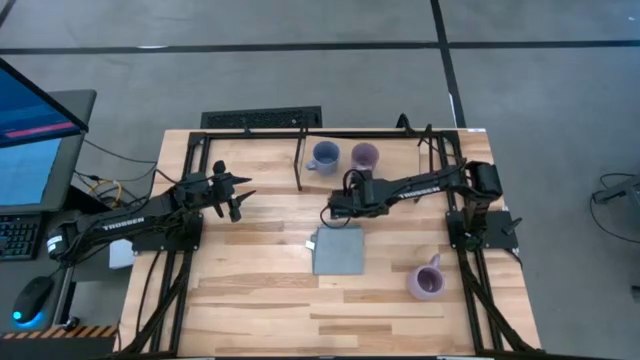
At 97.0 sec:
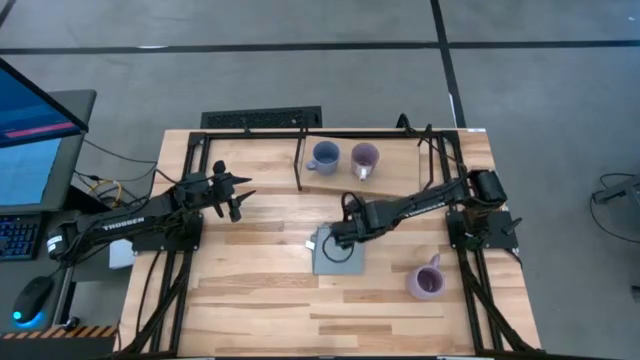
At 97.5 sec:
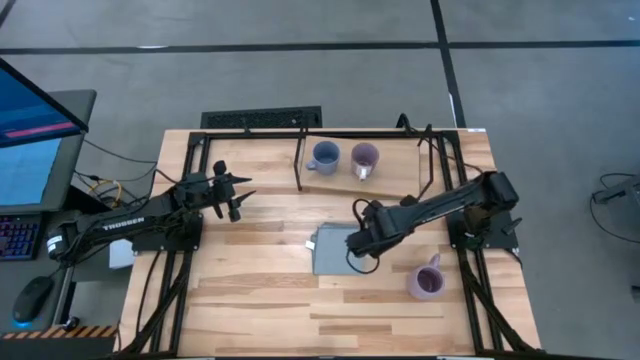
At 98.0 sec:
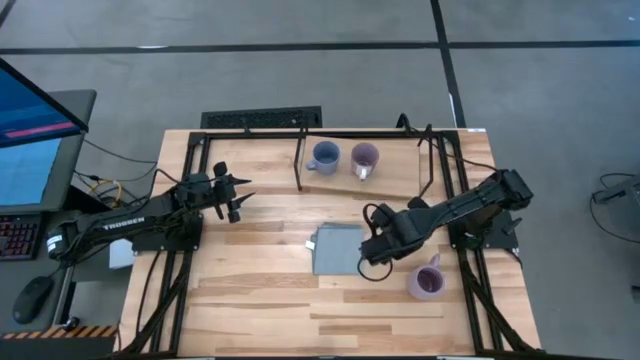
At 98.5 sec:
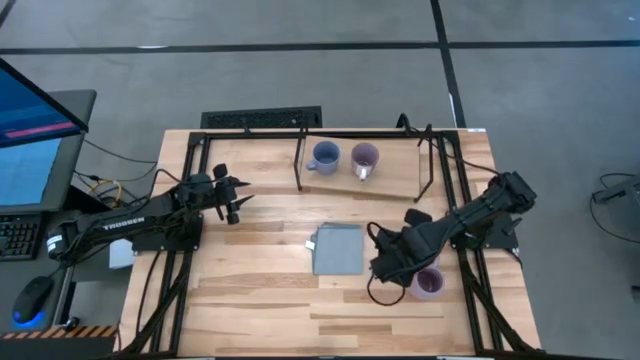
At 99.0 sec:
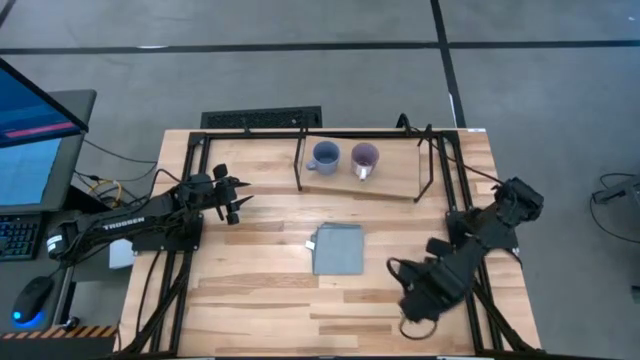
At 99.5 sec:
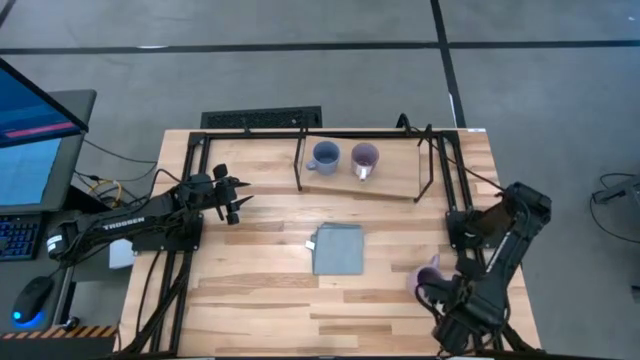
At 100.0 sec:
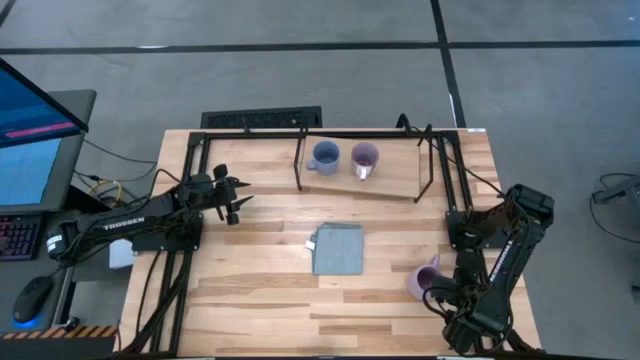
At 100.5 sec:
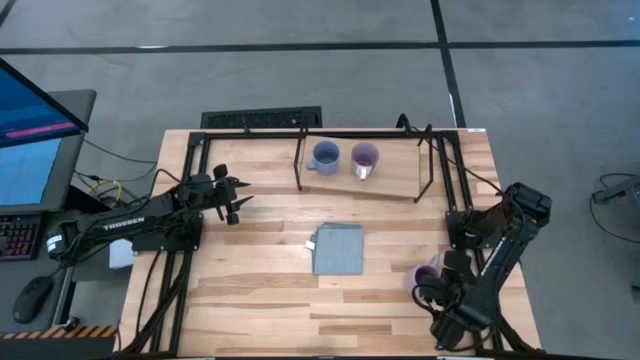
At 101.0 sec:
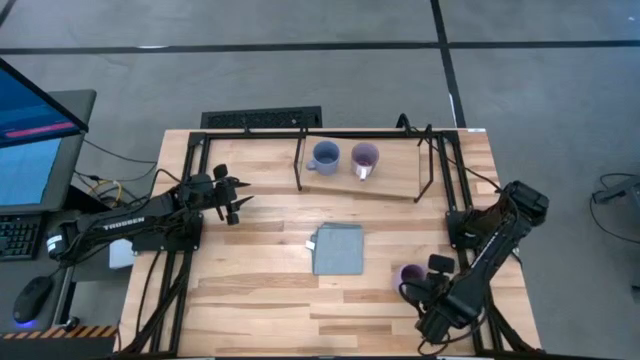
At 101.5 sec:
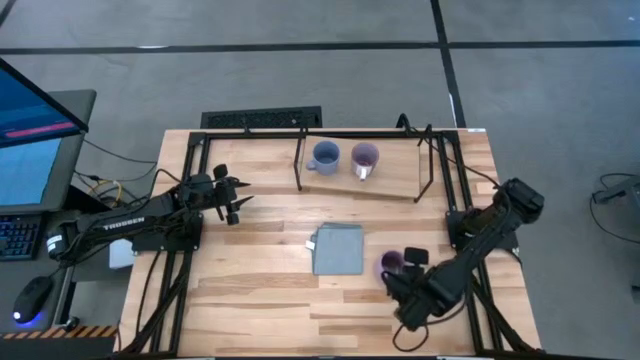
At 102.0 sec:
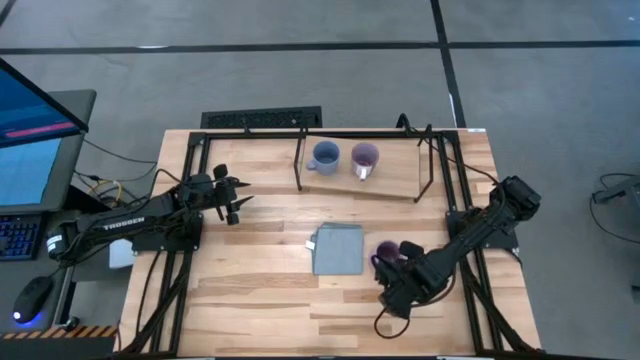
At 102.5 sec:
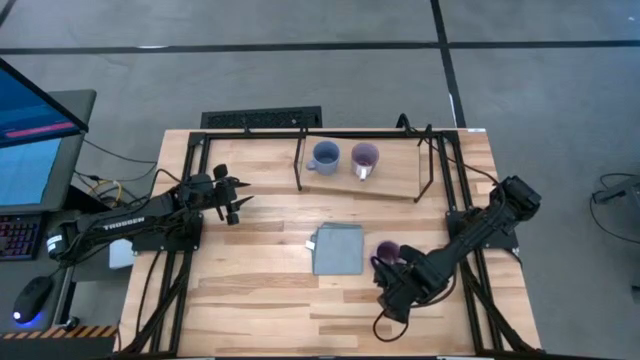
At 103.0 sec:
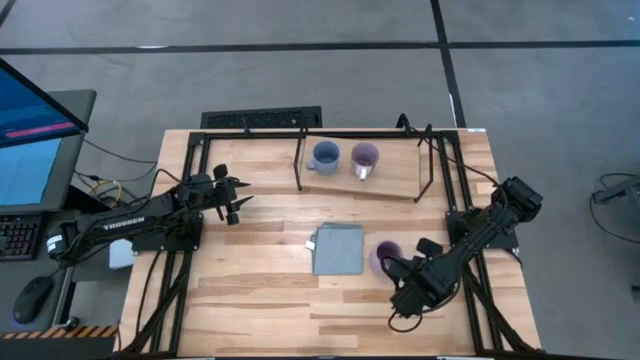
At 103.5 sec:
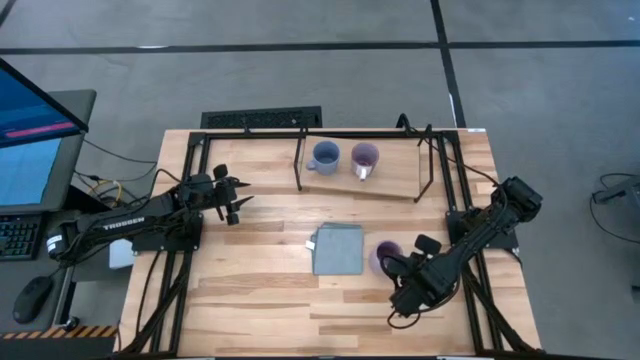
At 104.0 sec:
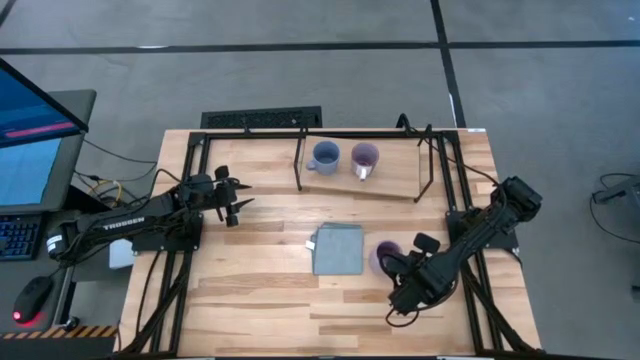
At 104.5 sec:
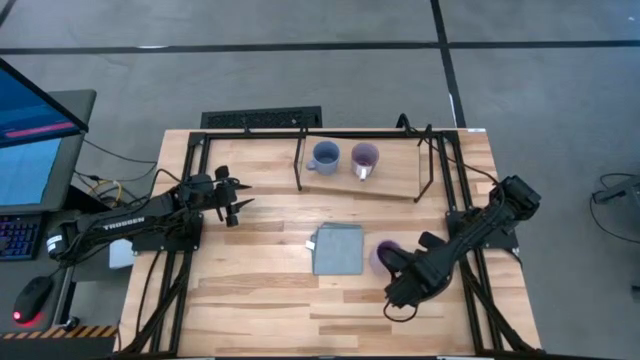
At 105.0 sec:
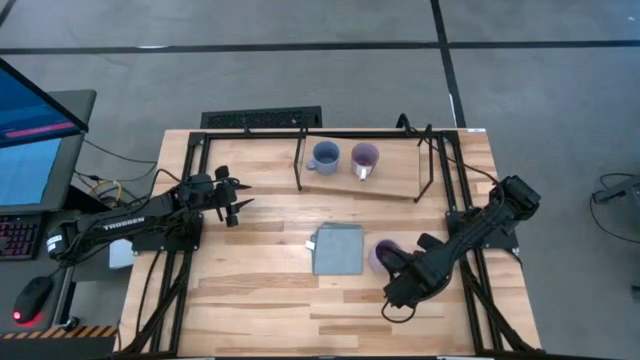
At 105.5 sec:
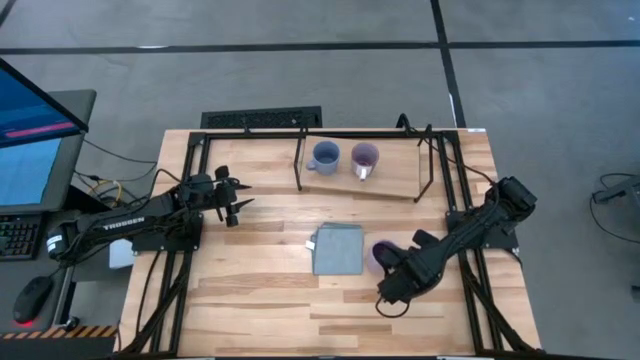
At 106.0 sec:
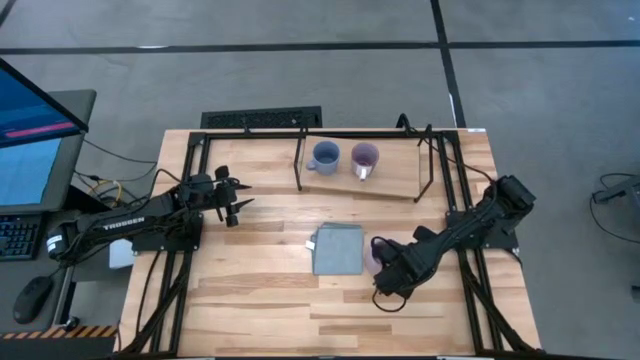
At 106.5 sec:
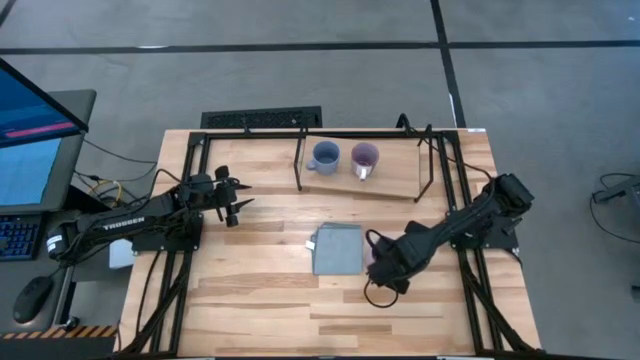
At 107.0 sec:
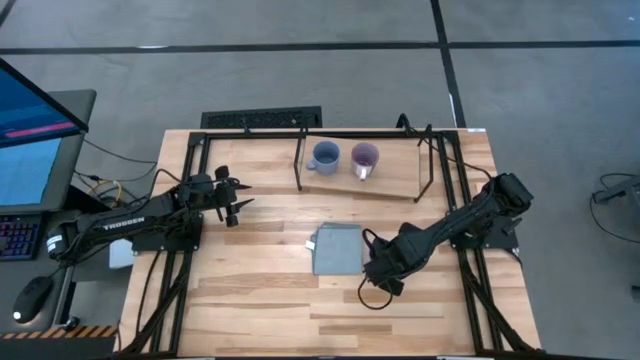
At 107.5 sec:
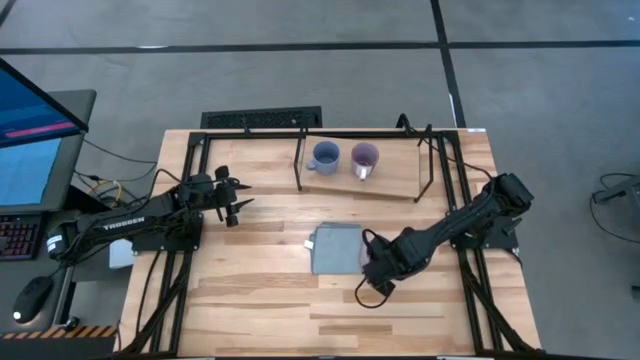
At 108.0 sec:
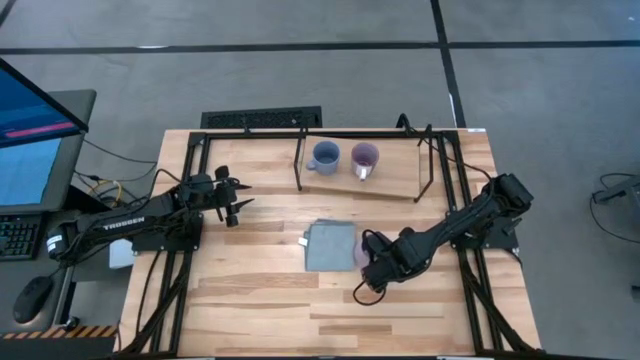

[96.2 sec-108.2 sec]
Task: Stack small to large cups/mugs on shelf
Put the violet cup on the shelf

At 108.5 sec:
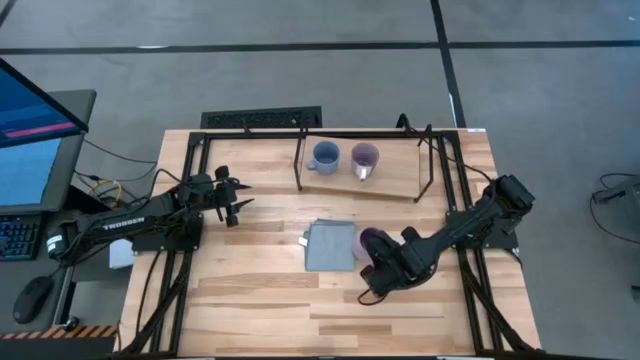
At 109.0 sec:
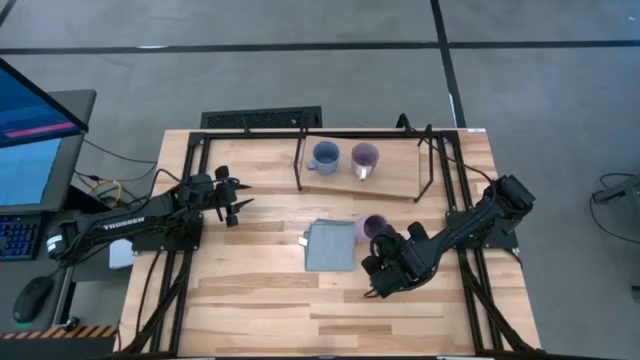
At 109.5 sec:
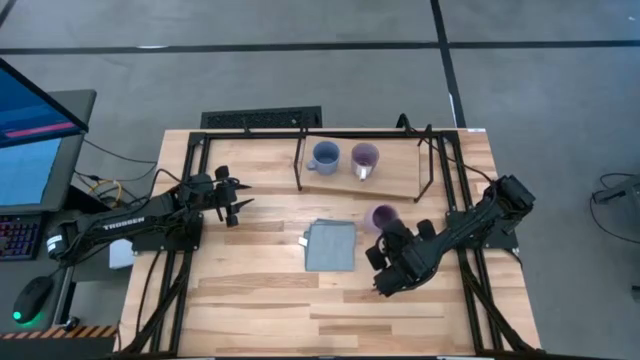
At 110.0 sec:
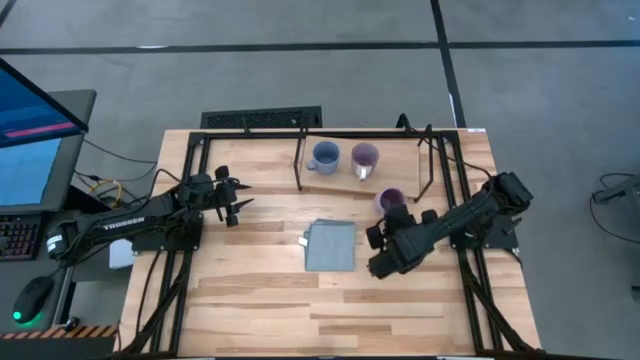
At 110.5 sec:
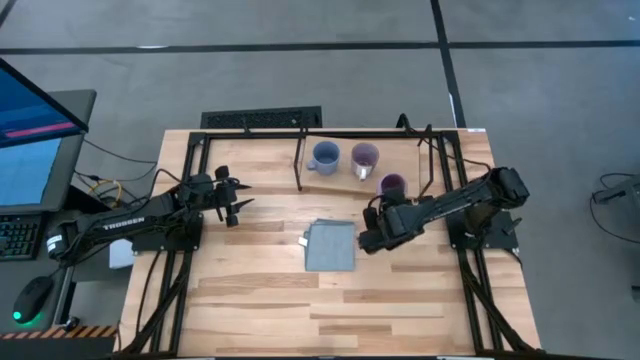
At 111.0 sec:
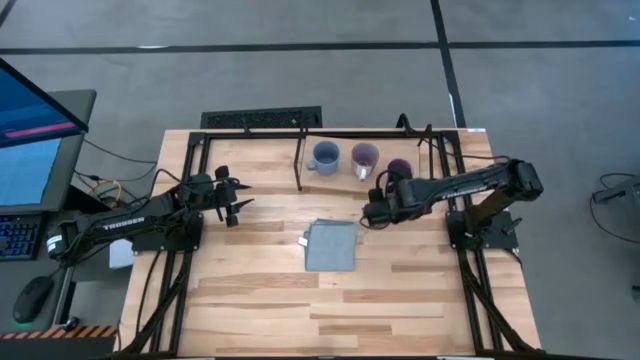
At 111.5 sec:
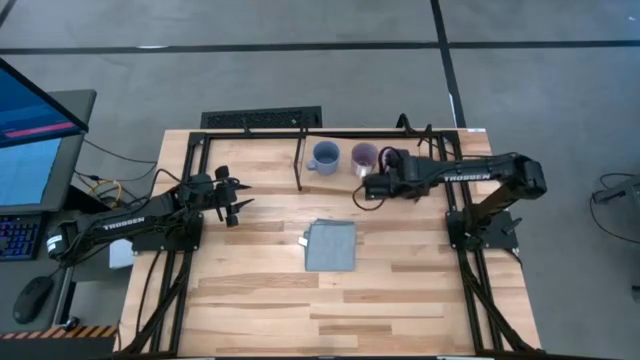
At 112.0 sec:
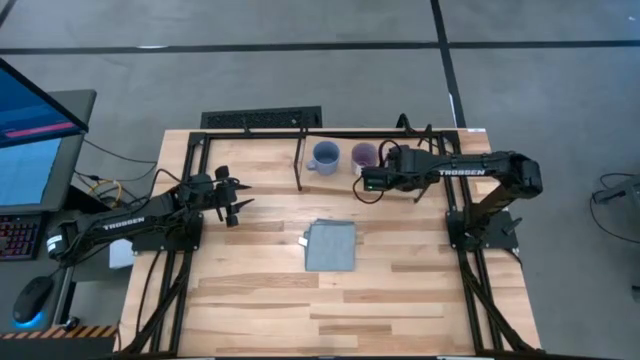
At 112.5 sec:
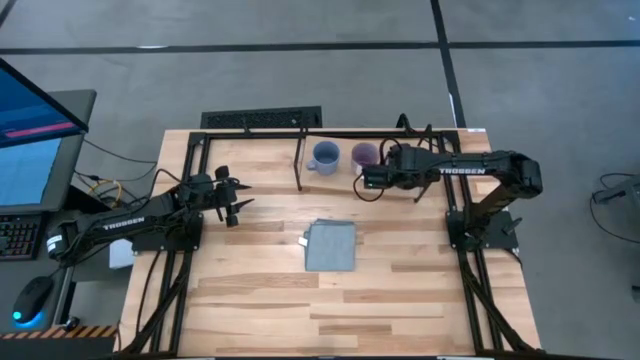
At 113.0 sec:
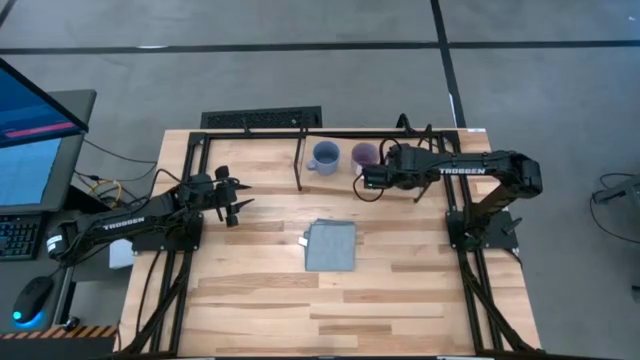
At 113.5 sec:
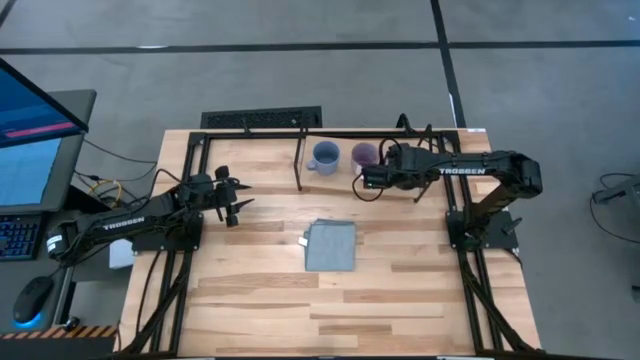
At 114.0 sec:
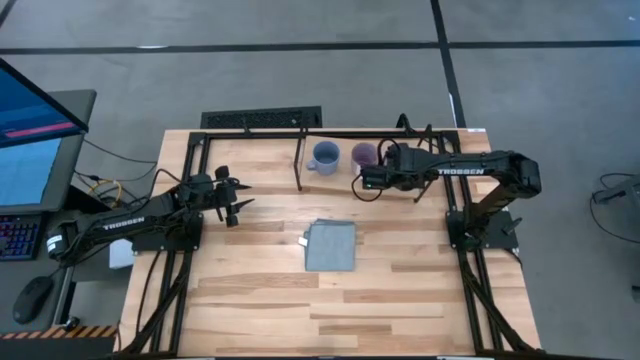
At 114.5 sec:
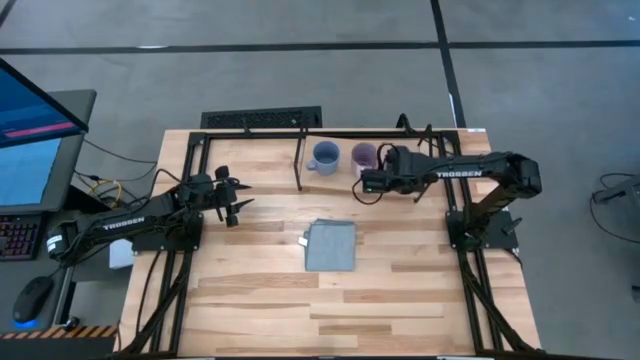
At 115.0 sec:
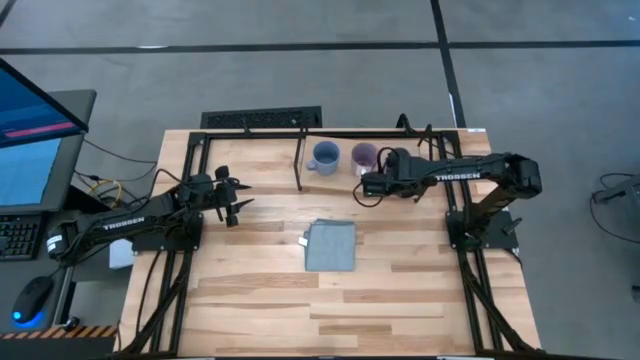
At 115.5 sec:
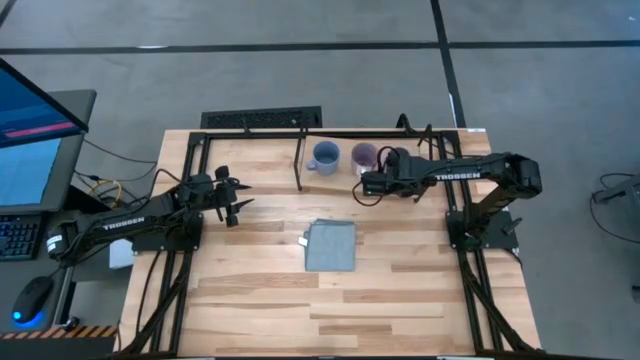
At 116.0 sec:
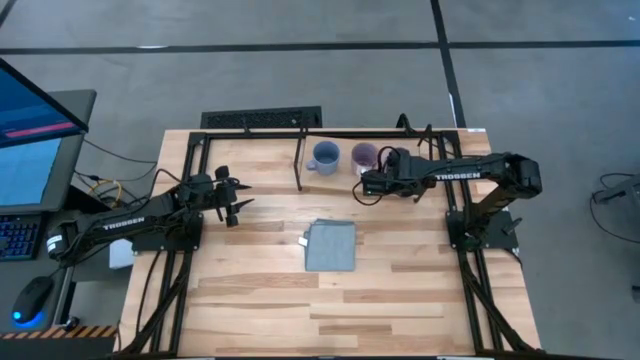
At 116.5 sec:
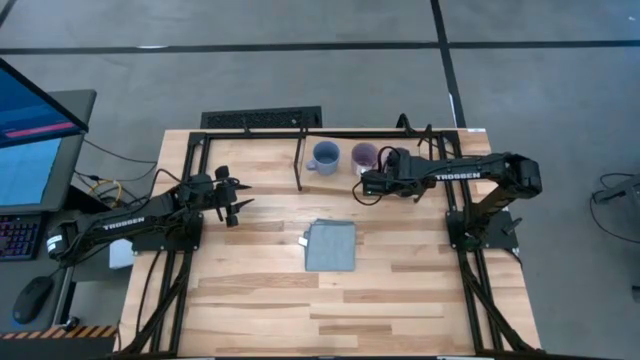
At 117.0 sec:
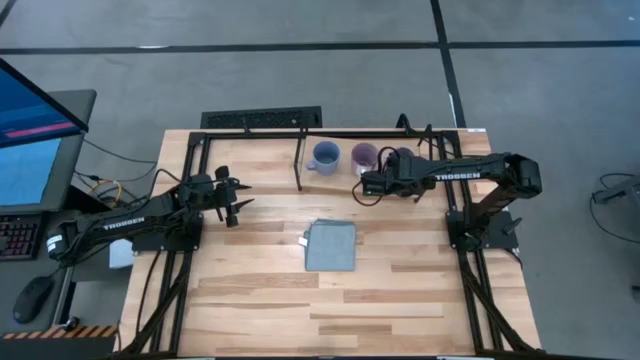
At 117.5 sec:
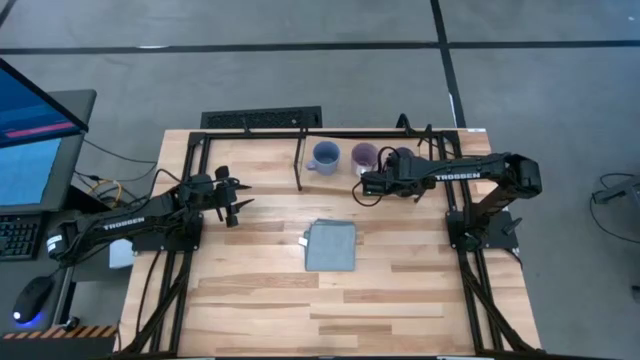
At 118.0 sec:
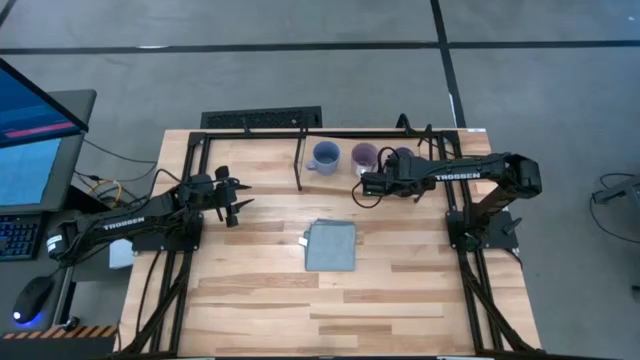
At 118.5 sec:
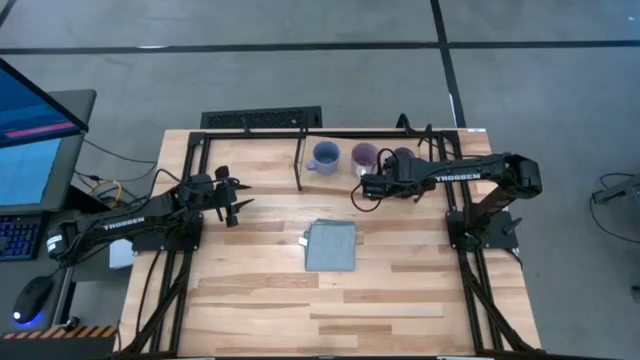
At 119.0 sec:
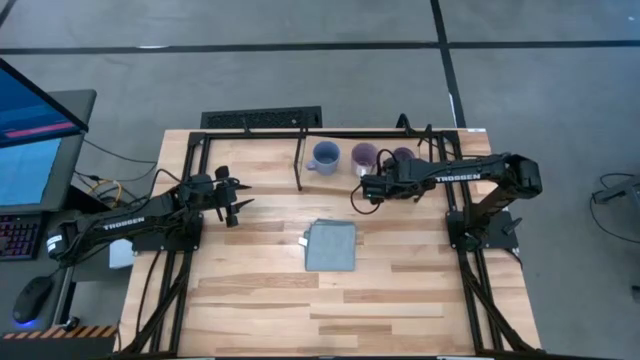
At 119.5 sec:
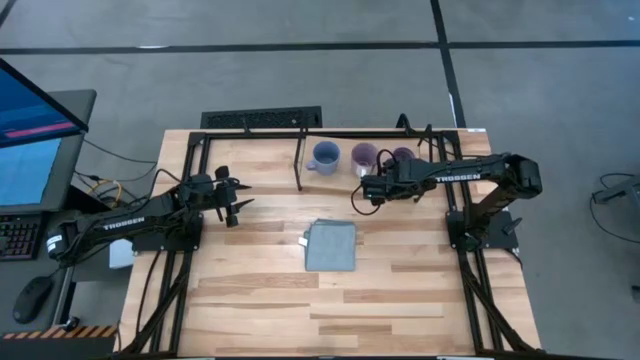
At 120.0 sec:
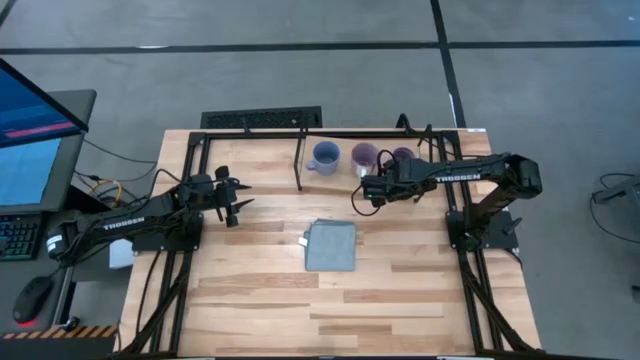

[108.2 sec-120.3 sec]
Put the violet cup on the shelf
